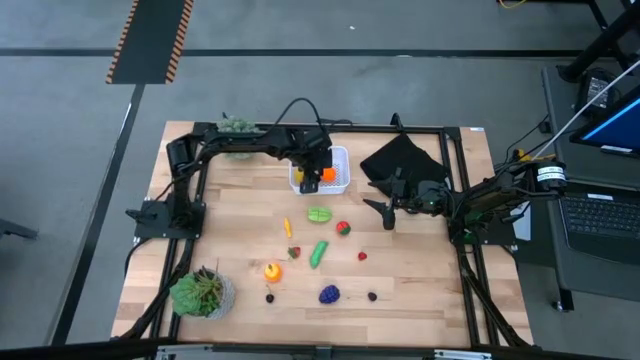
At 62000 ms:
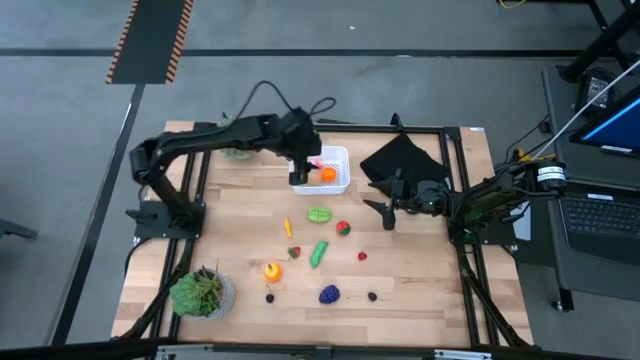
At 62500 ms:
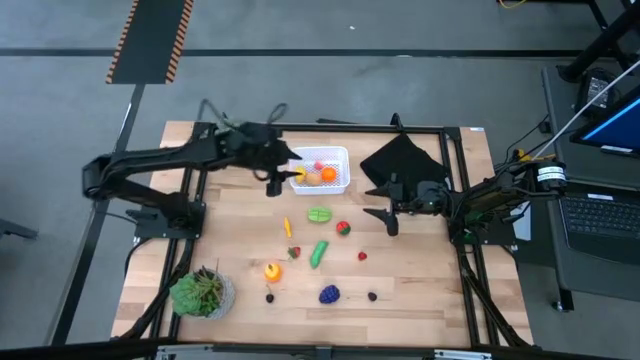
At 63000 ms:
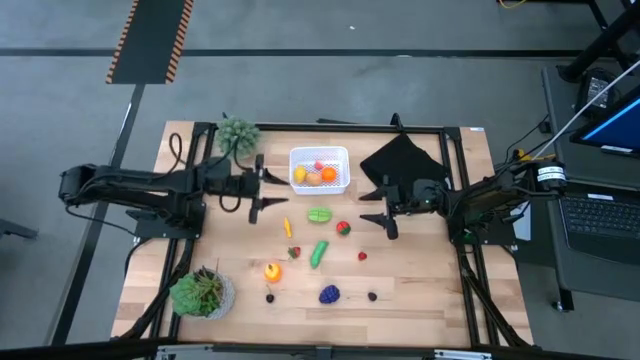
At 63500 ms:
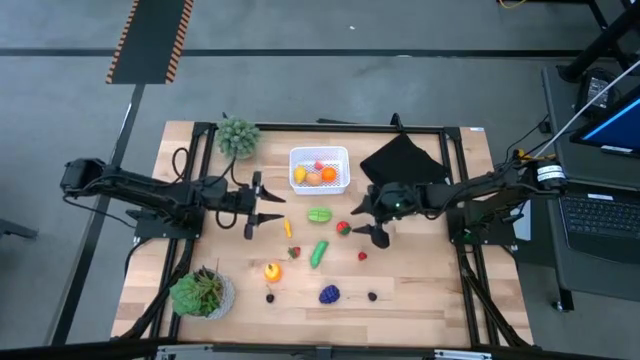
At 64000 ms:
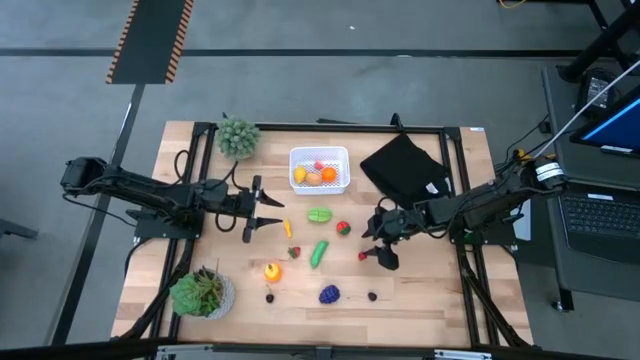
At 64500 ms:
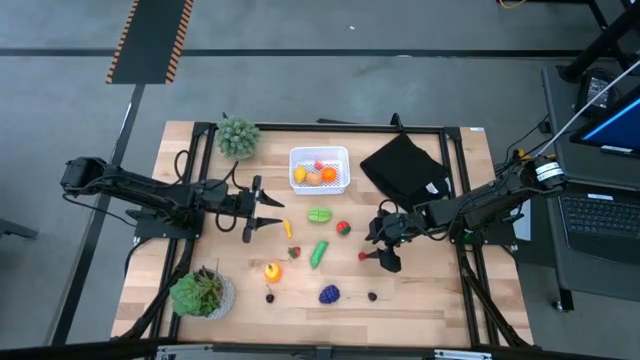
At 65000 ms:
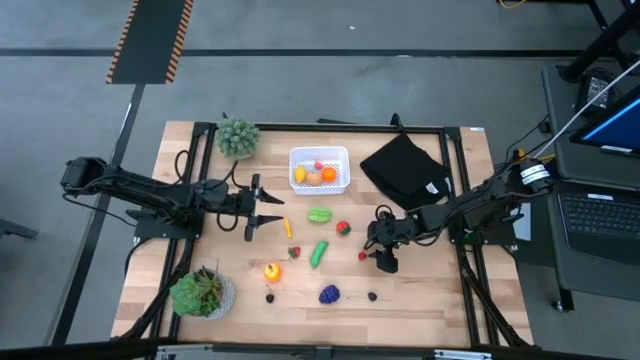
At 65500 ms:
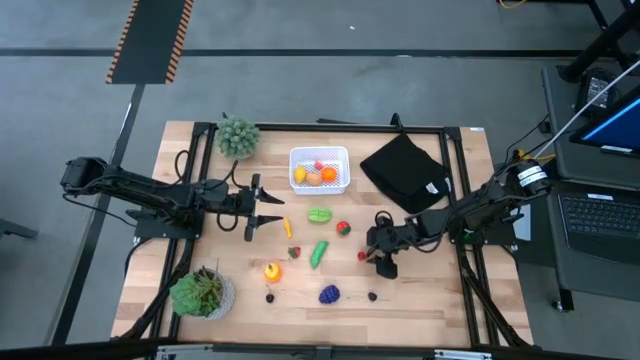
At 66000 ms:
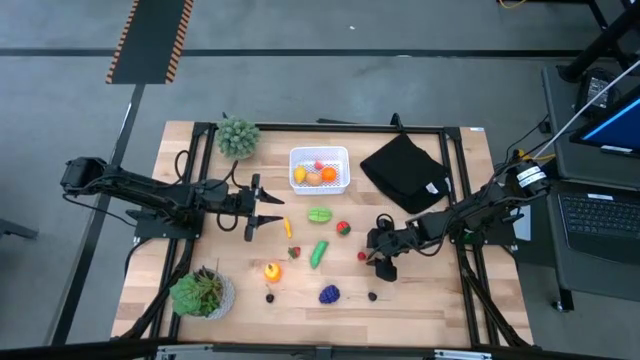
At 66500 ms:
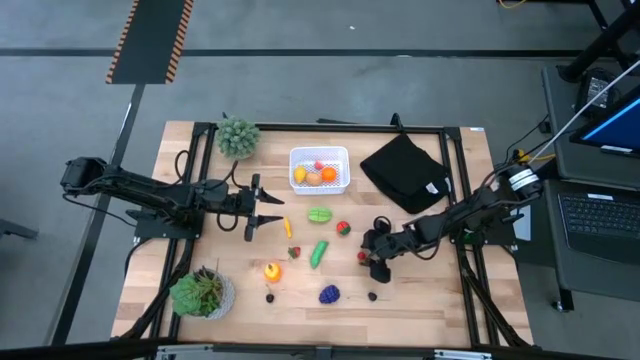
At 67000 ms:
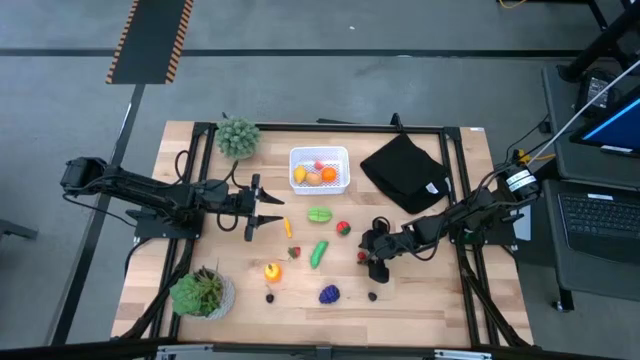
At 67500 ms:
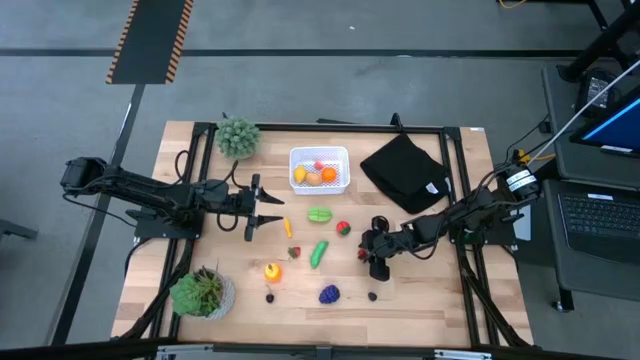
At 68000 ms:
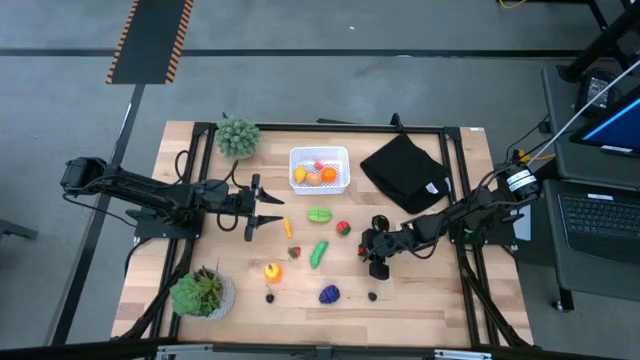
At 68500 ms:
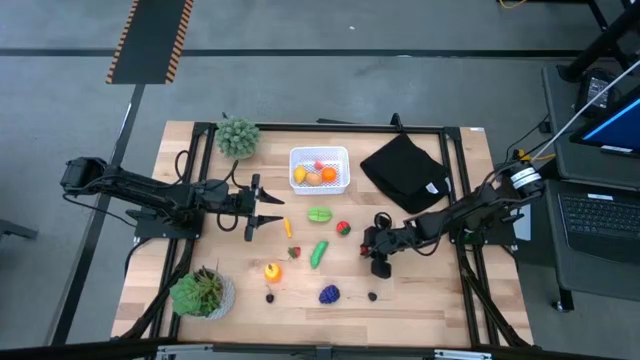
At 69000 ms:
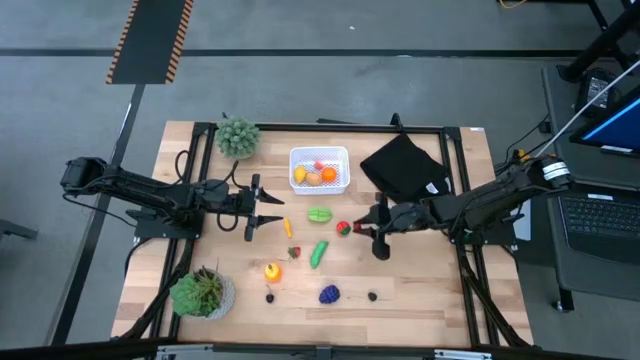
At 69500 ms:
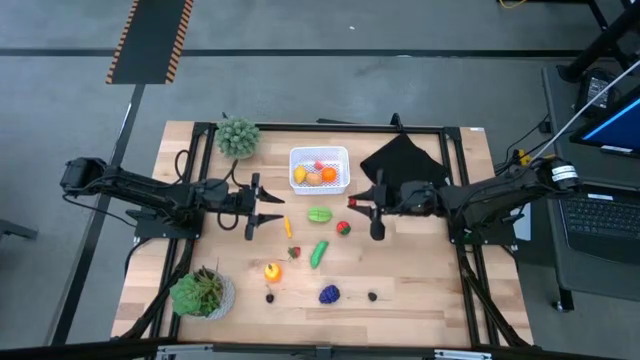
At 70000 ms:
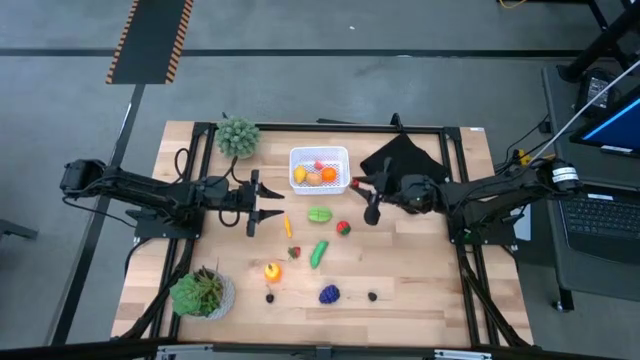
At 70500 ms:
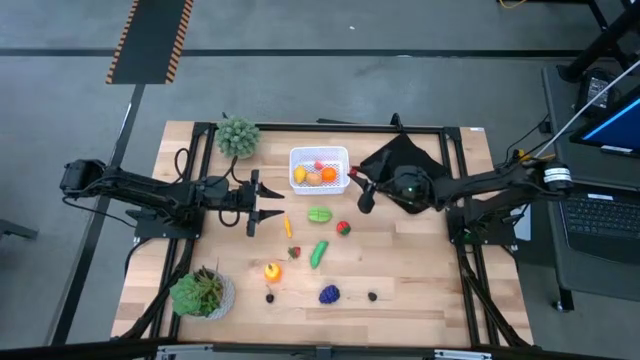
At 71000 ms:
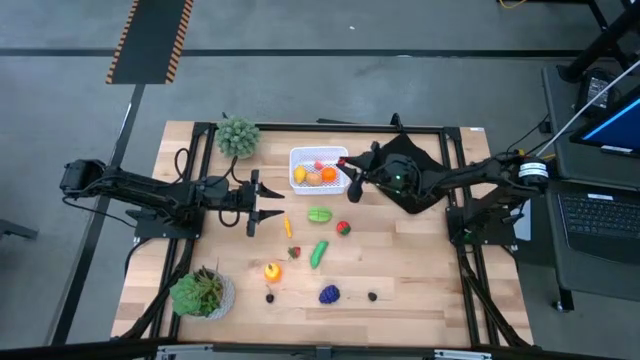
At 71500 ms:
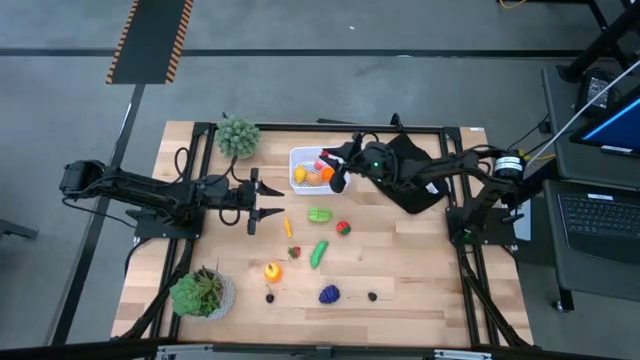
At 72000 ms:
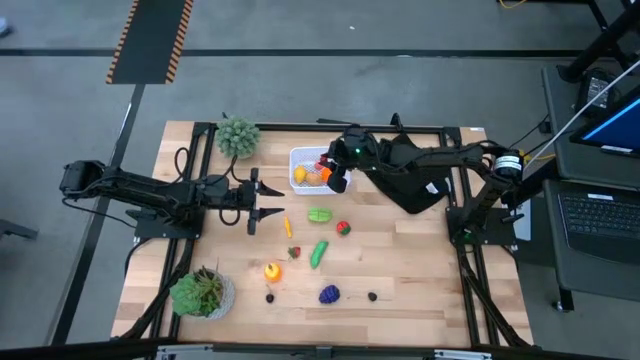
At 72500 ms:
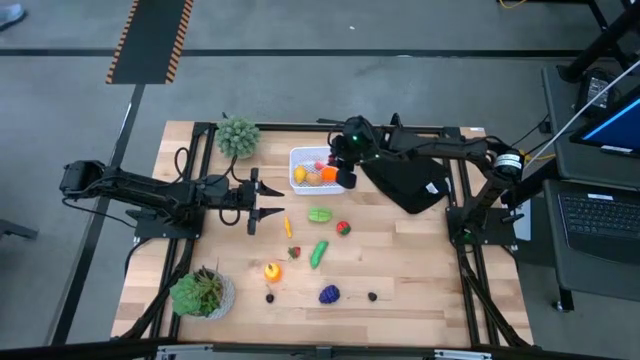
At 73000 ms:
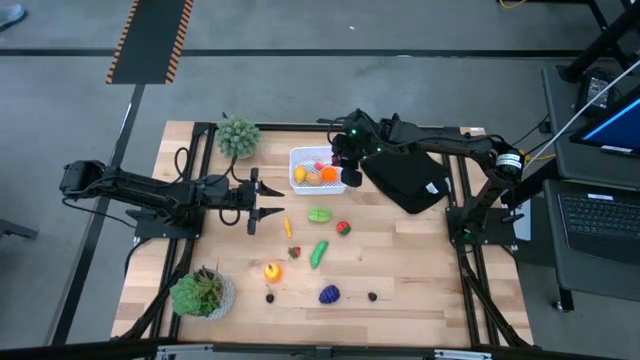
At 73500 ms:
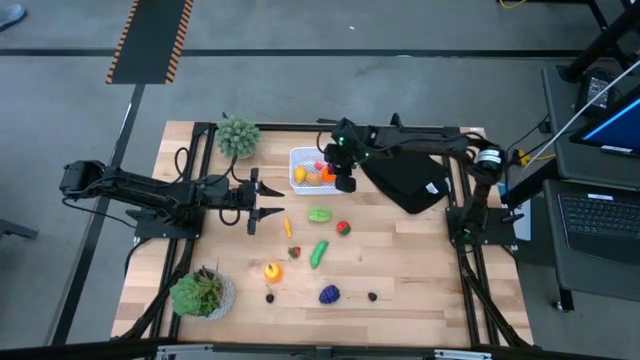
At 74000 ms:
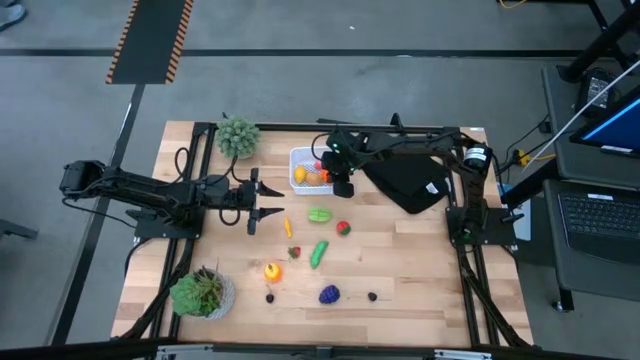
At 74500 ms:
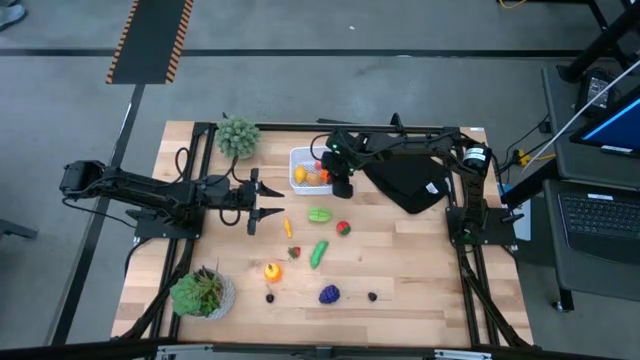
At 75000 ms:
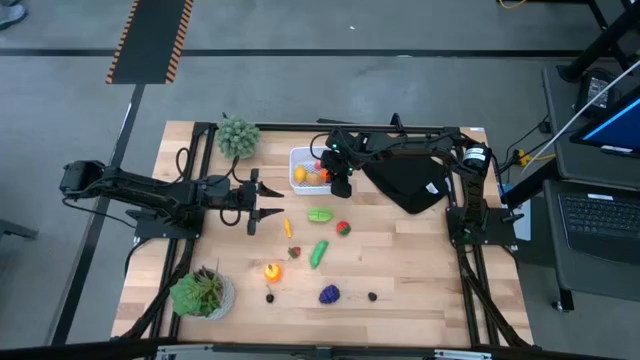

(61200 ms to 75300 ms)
Task: Pick and placing Produce into tupperware
Put the raspberry into the white bin

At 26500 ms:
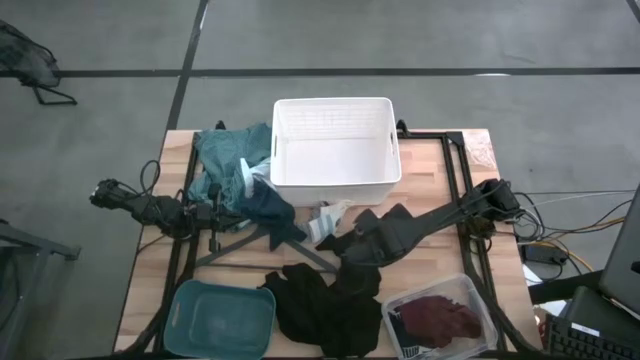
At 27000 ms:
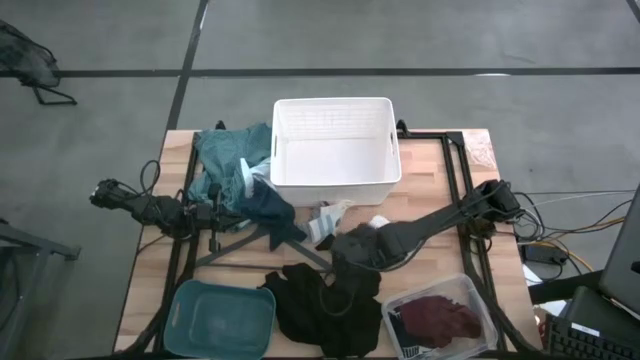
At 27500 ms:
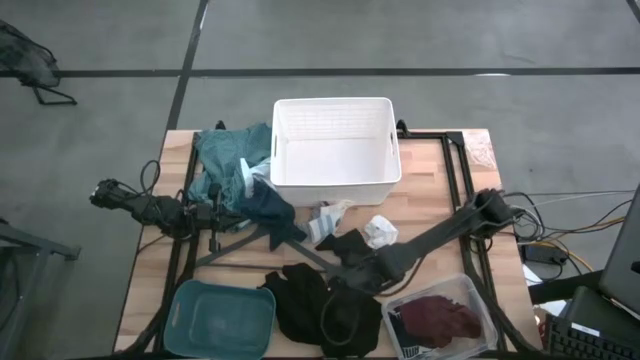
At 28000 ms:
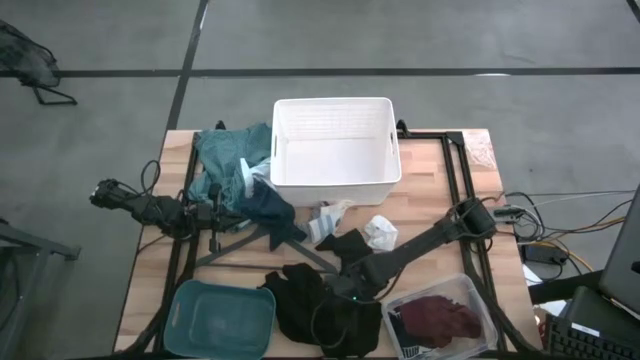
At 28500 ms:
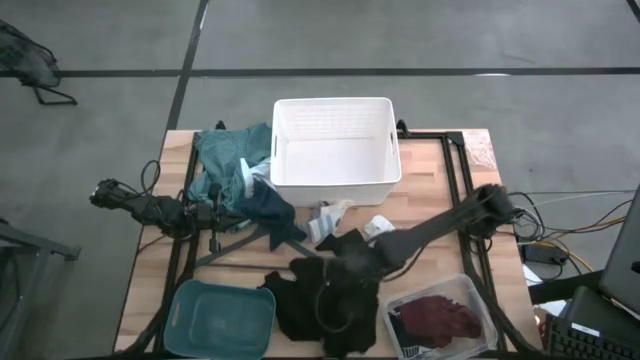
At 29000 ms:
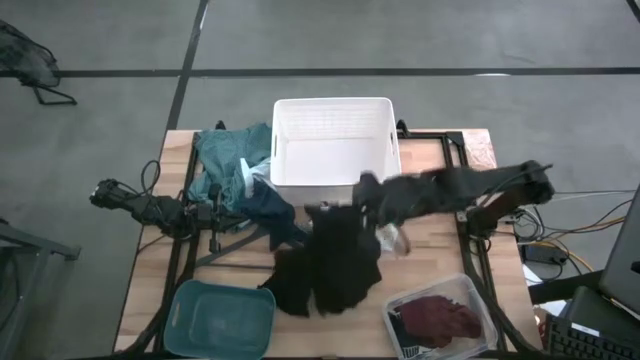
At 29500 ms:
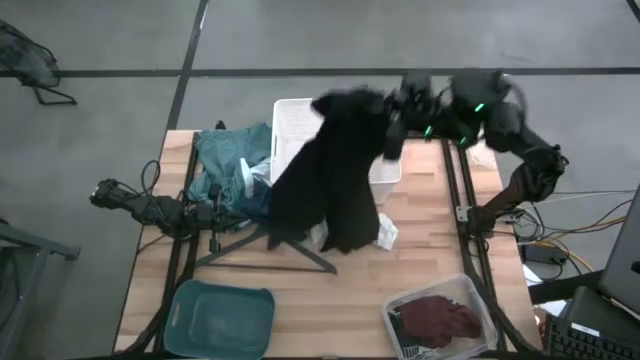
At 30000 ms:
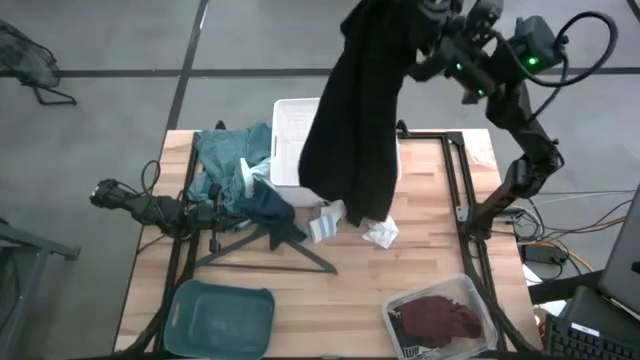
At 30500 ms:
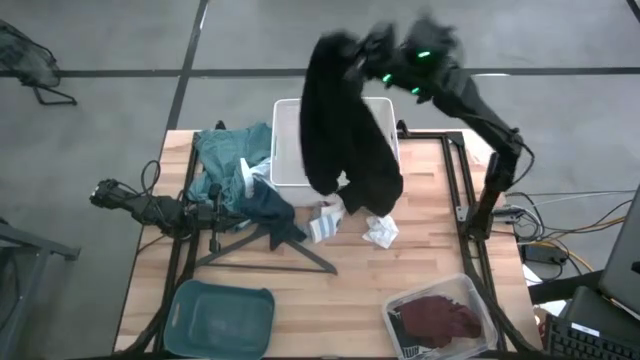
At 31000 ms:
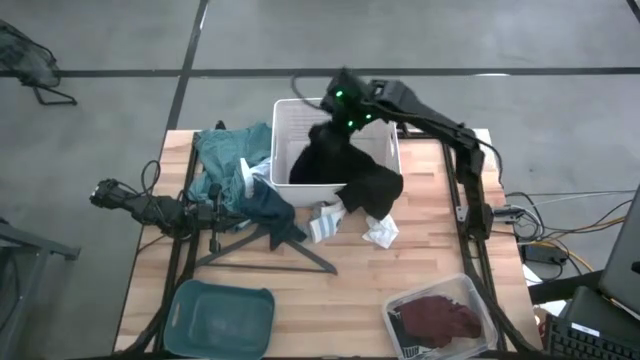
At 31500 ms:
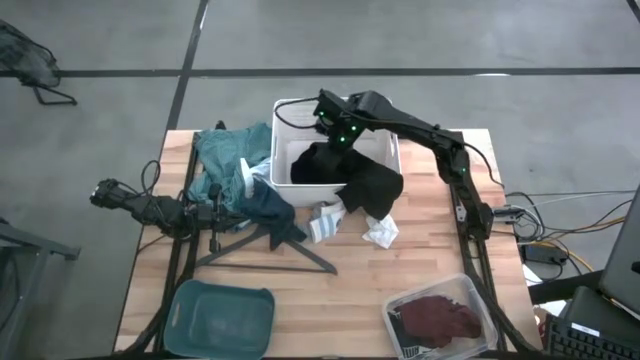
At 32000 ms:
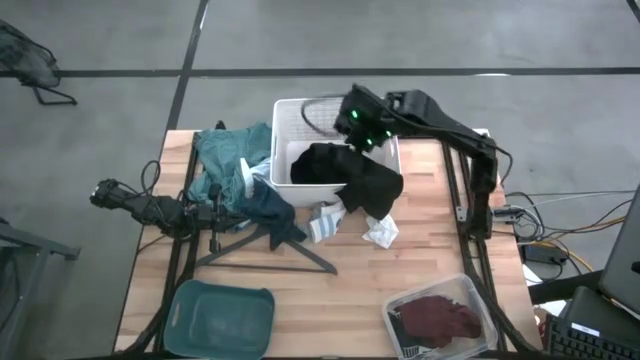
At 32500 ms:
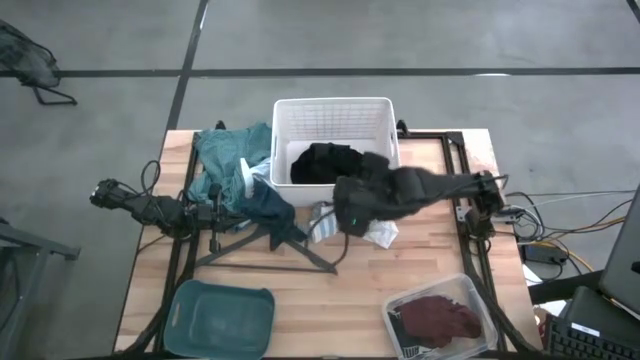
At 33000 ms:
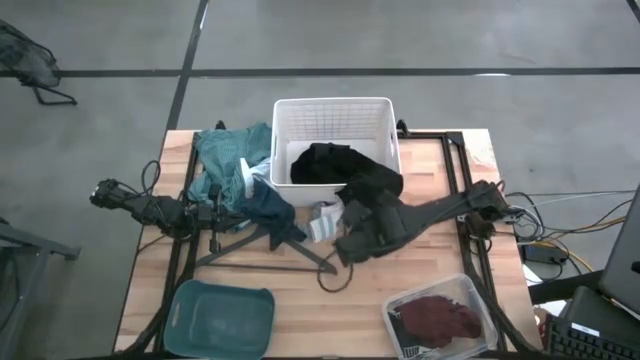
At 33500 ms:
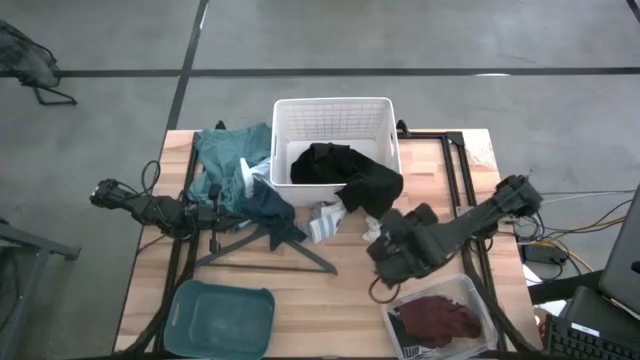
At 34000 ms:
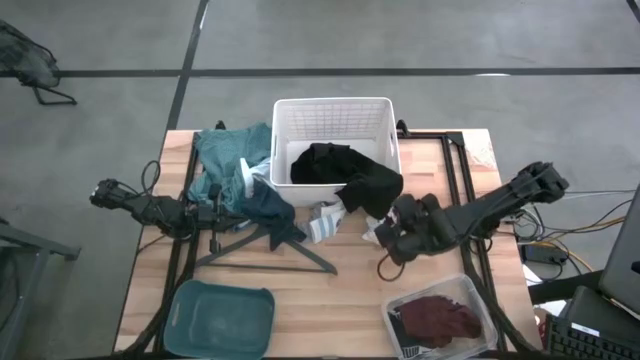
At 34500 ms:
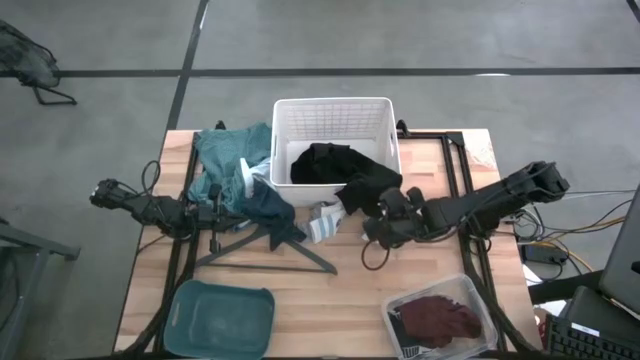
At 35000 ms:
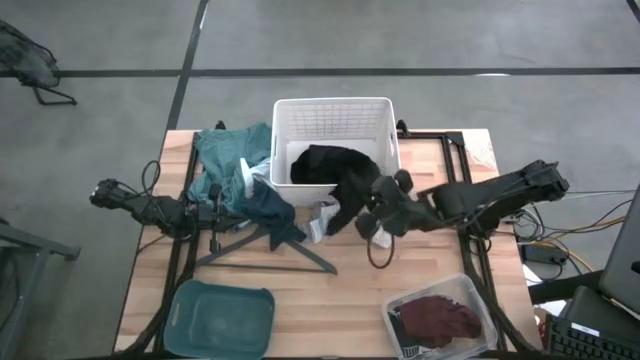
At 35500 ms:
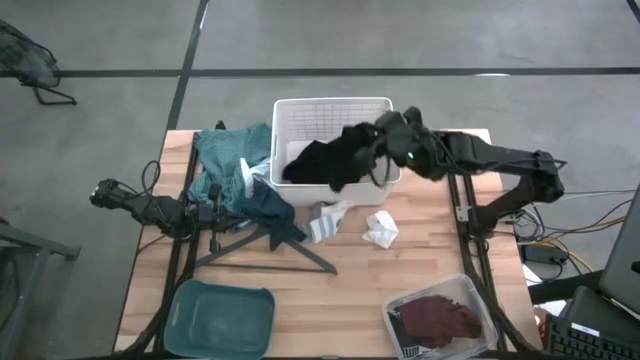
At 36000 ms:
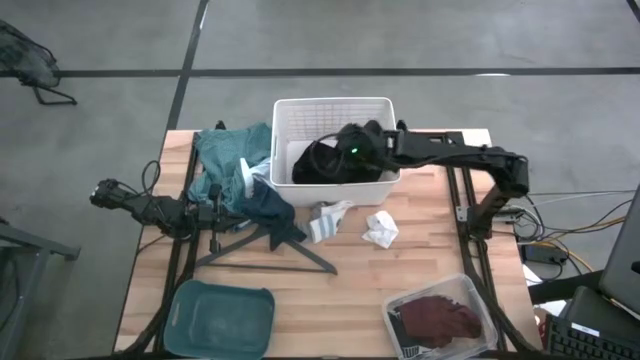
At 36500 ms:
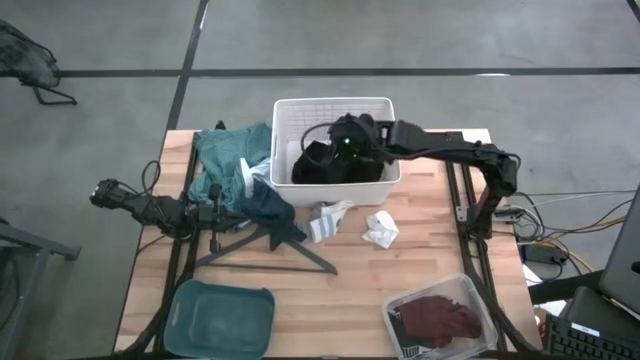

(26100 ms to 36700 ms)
Task: Pick & Place Cloths
Put the black shirt into the white laundry bin
